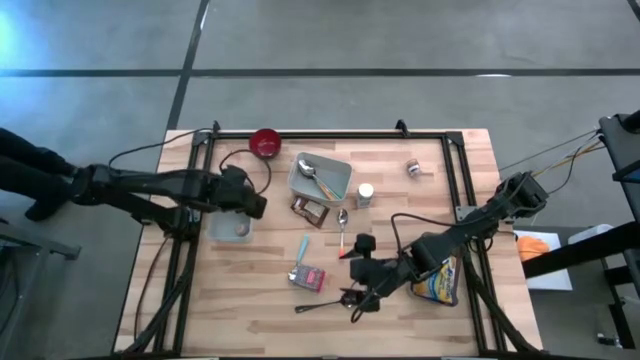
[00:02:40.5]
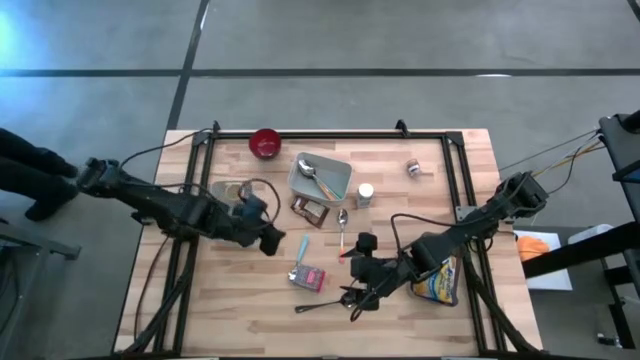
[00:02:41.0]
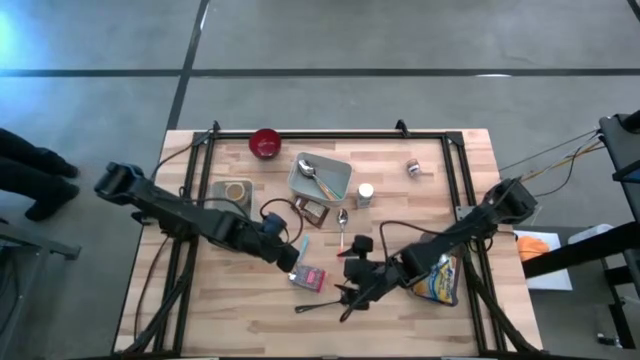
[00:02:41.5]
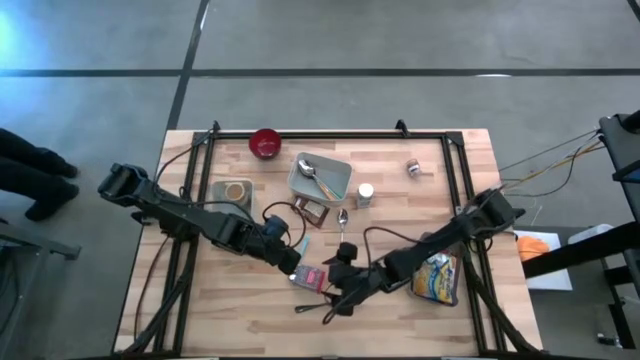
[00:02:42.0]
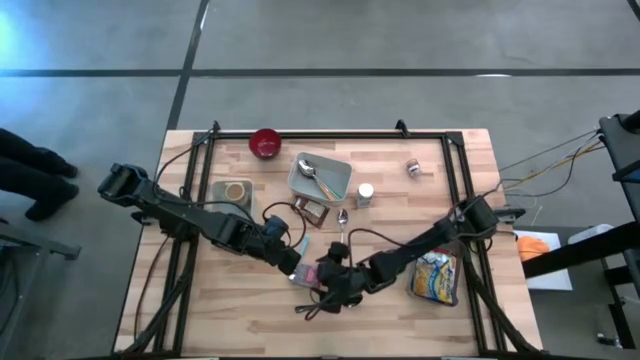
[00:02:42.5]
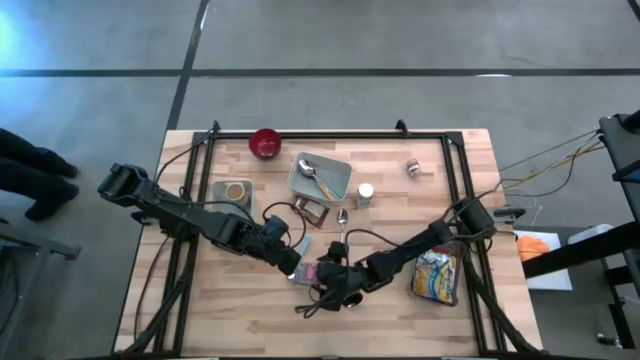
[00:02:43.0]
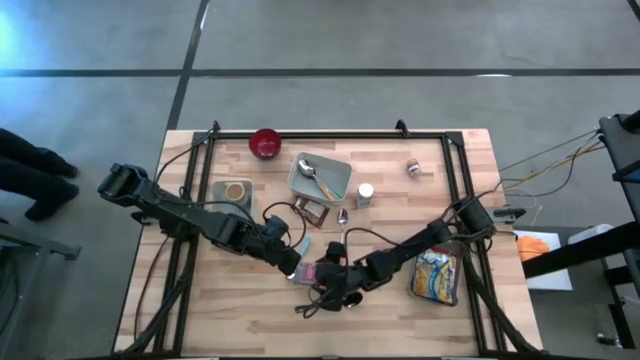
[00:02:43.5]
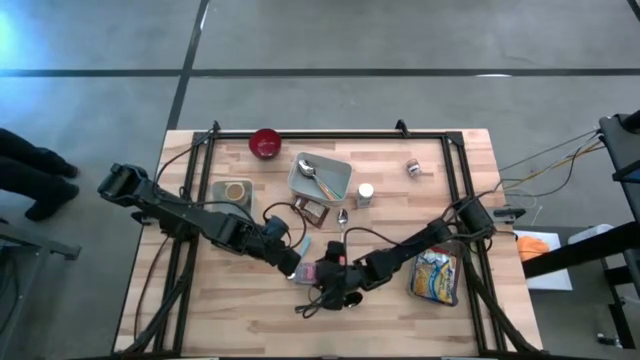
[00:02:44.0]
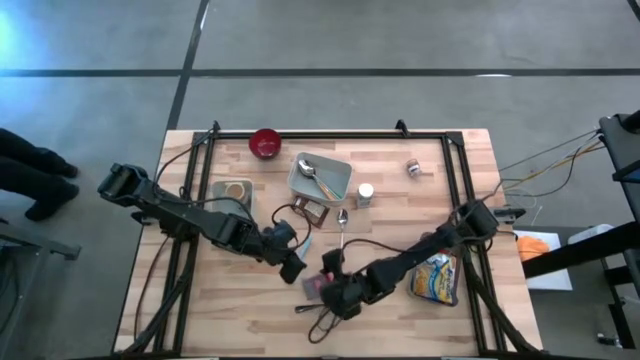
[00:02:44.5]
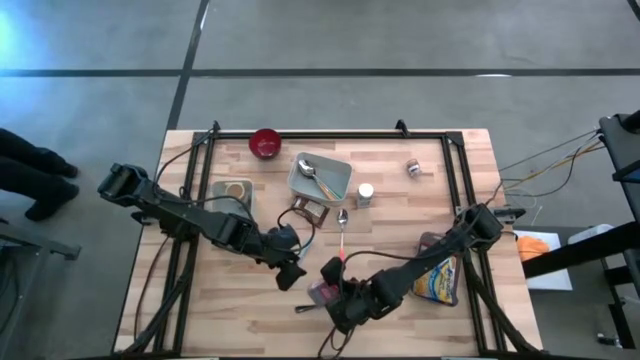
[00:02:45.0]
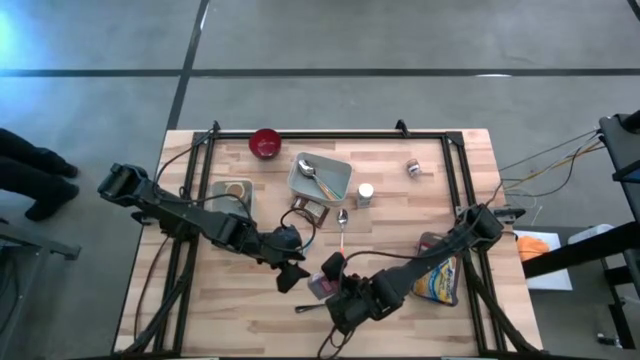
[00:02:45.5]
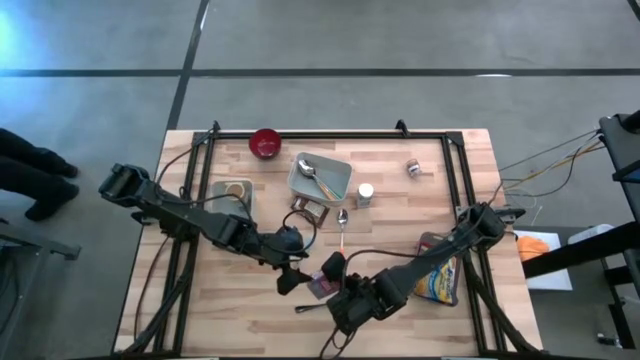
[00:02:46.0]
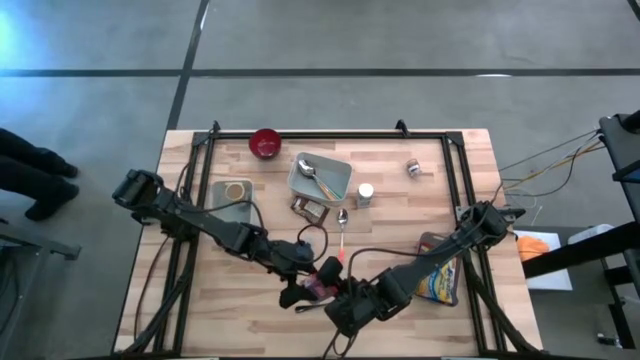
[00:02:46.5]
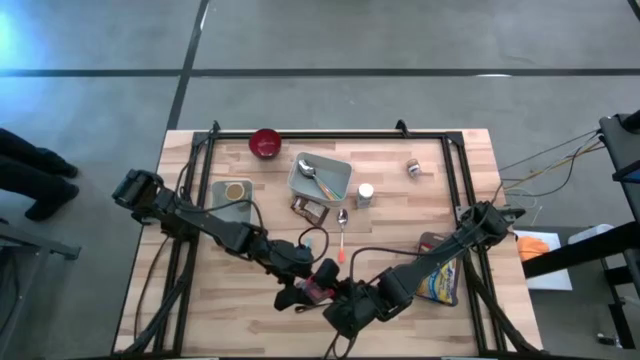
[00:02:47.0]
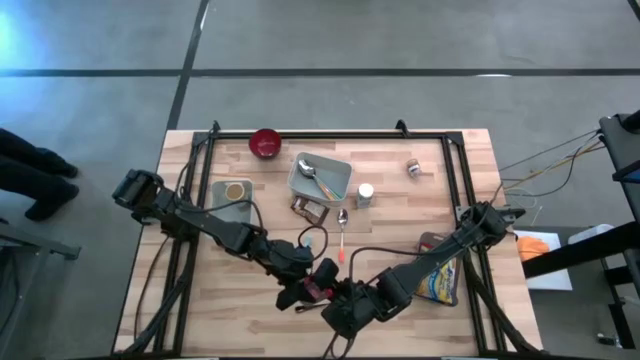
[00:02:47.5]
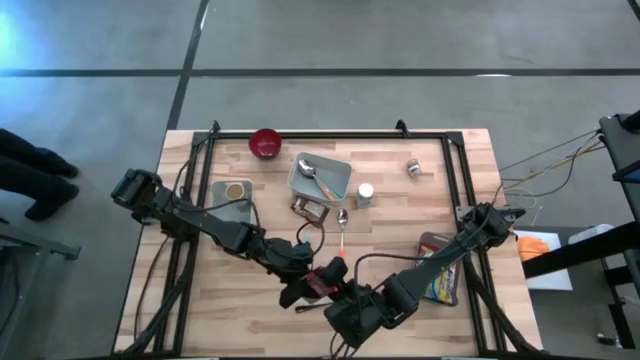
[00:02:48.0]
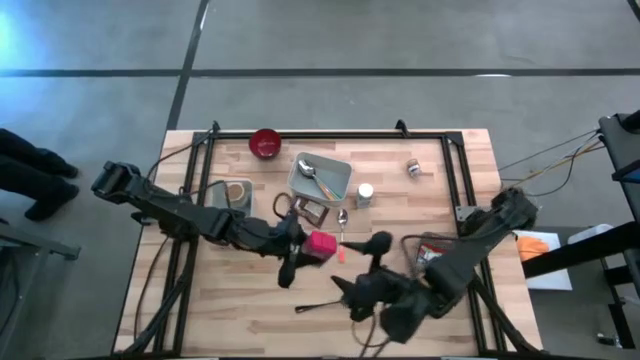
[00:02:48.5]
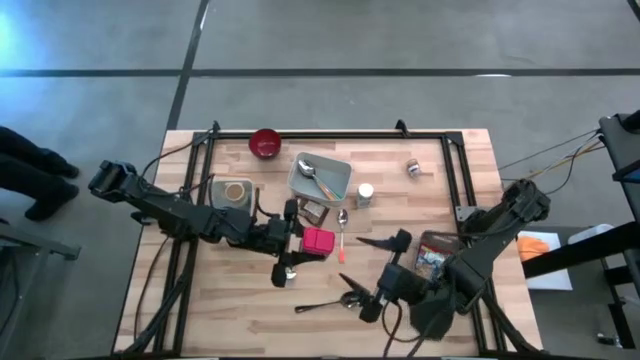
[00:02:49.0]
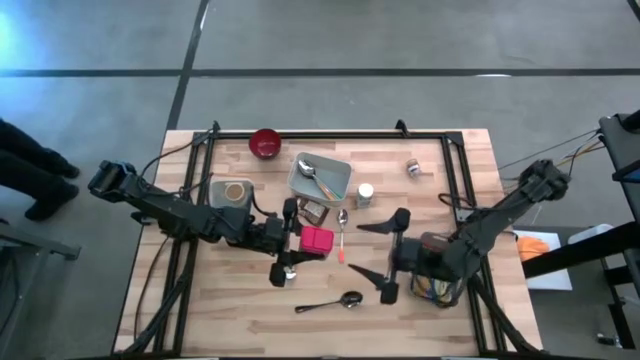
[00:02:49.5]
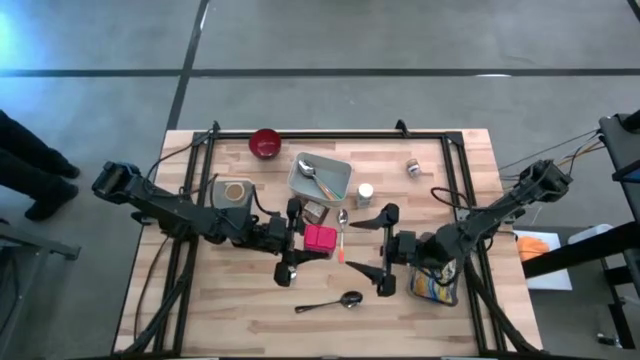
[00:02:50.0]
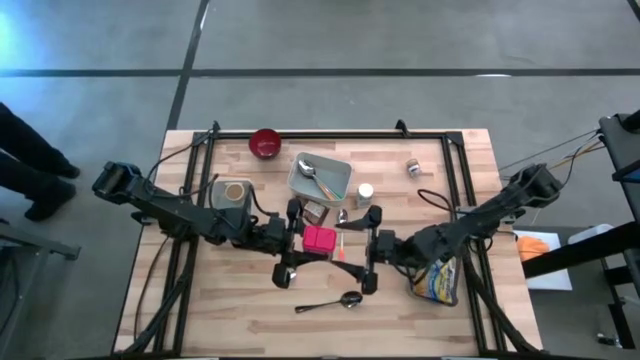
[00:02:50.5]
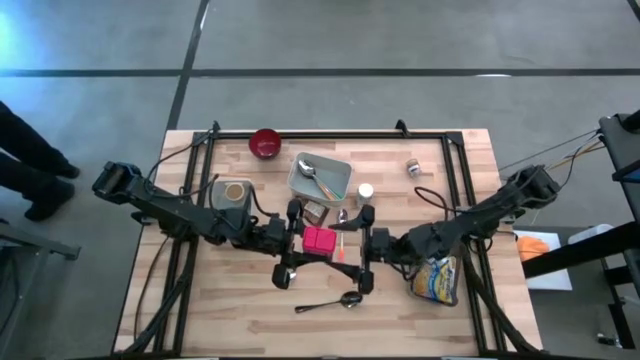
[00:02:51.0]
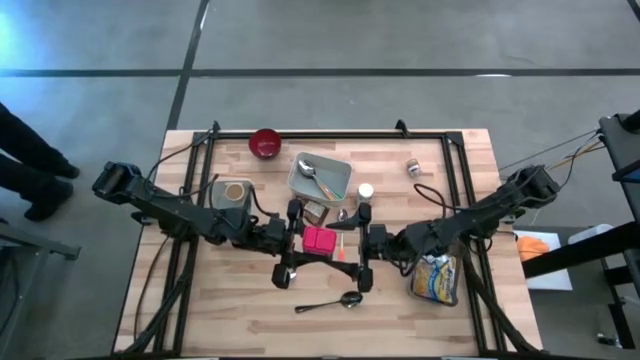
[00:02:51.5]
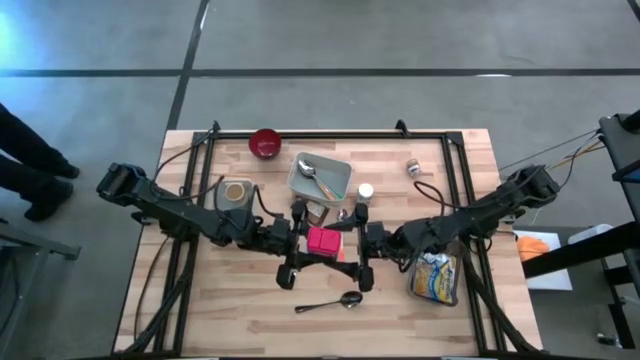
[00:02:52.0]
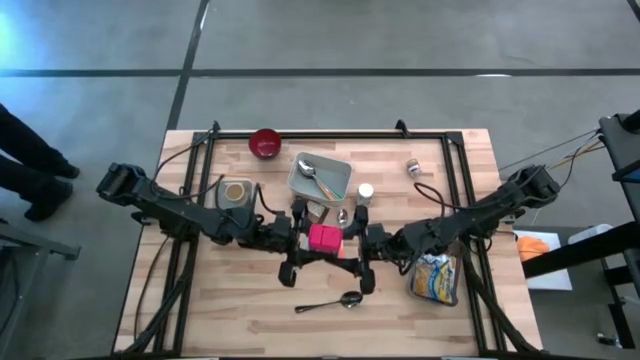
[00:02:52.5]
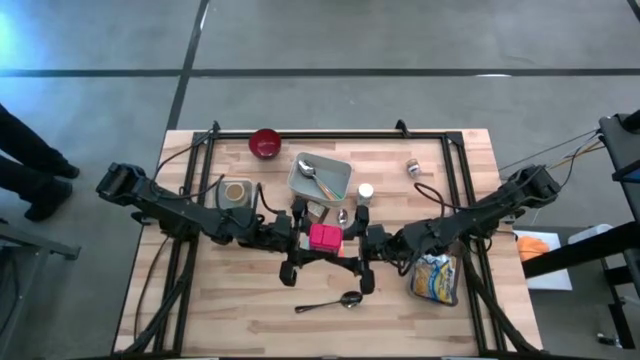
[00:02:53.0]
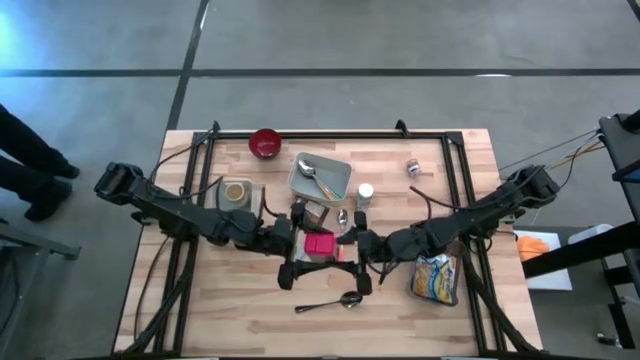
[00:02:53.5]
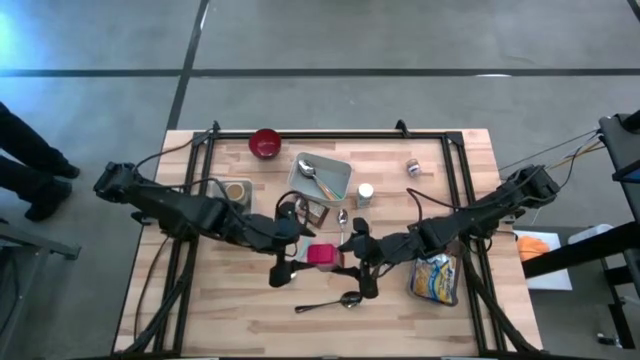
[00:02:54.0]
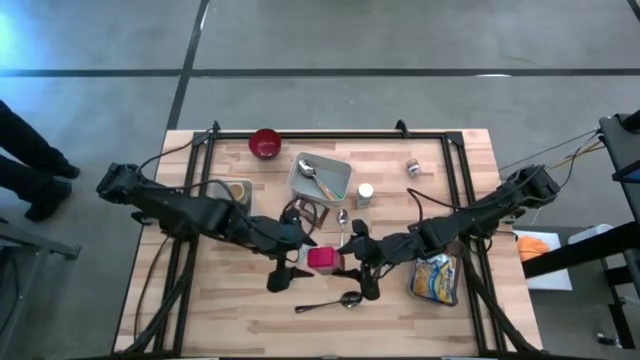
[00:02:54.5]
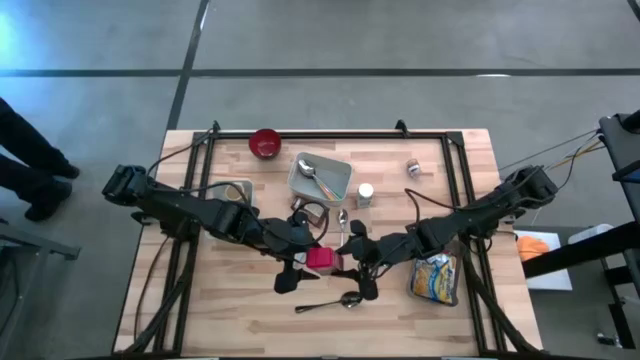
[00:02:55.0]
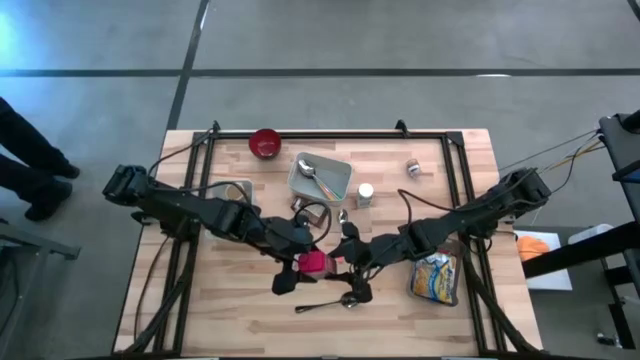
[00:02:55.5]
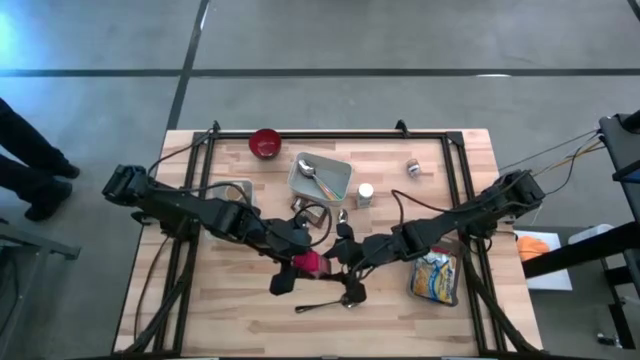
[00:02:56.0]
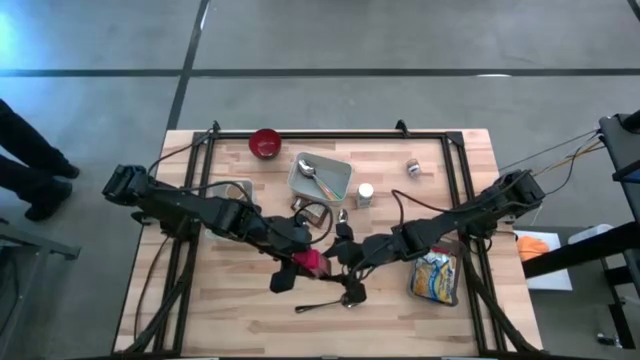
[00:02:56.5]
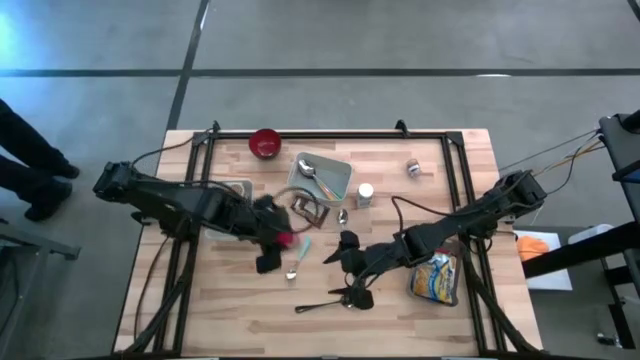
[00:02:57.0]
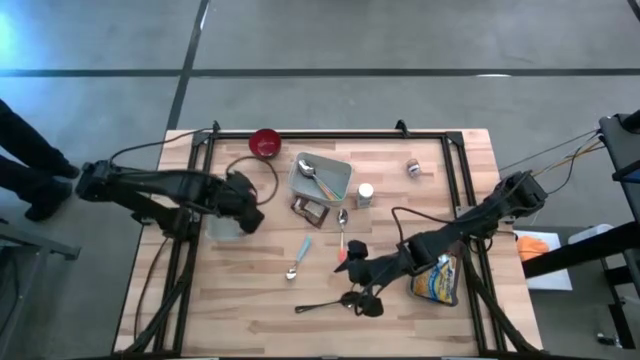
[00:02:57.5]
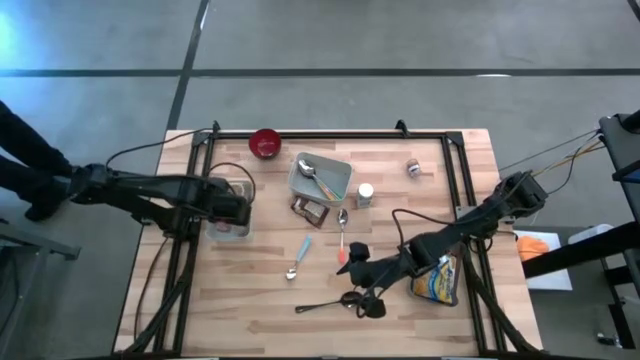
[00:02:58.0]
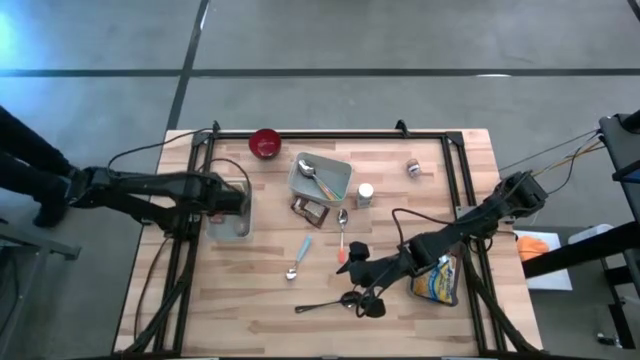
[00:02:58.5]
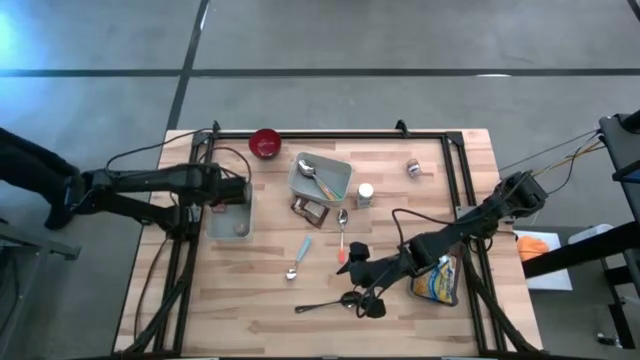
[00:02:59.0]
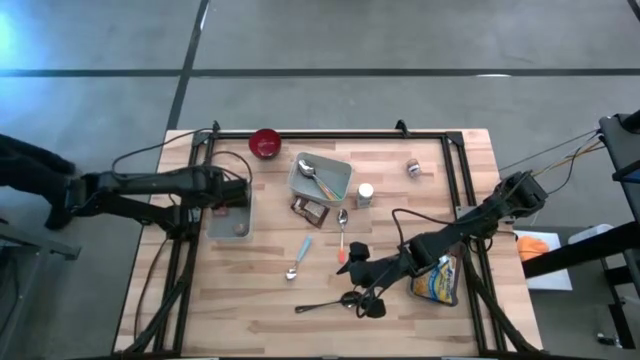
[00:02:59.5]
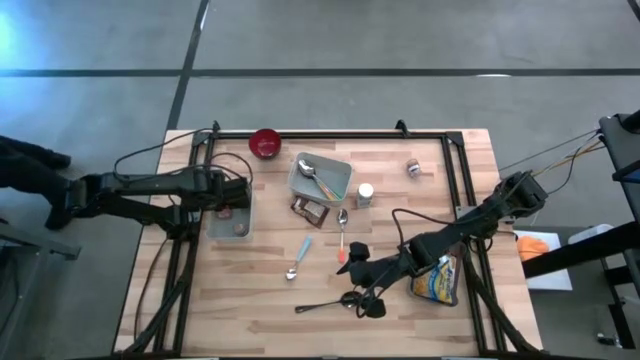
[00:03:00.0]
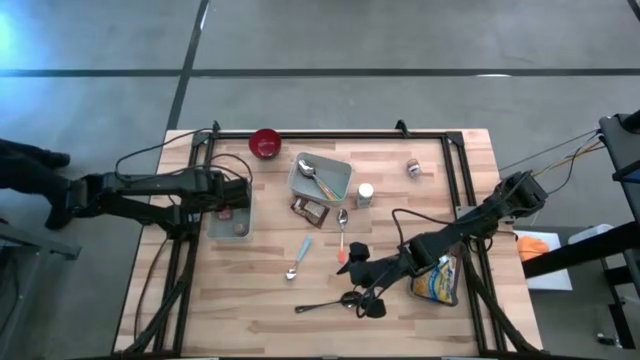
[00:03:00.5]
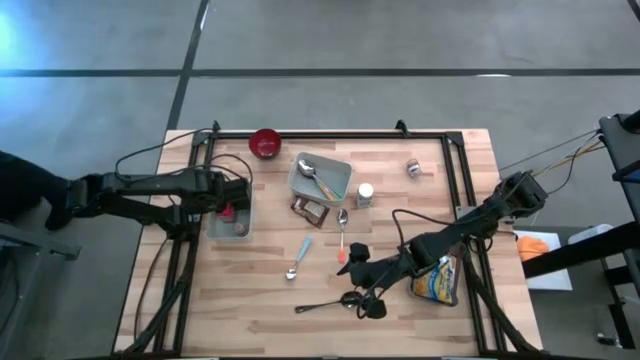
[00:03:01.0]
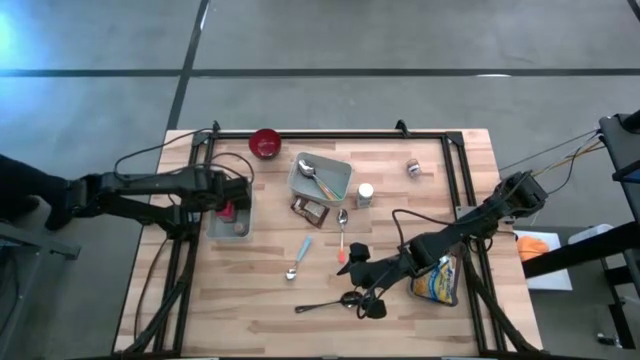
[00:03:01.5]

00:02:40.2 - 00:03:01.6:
Put the red seasoning can into the left gray bin
